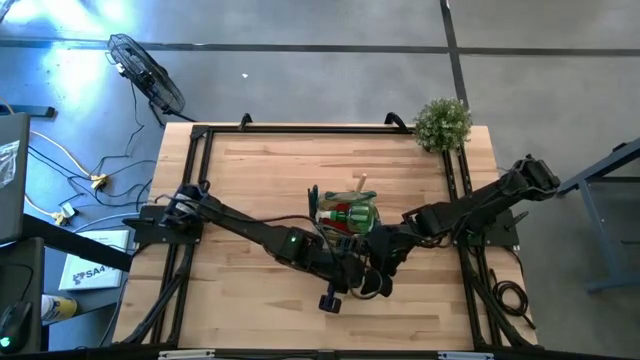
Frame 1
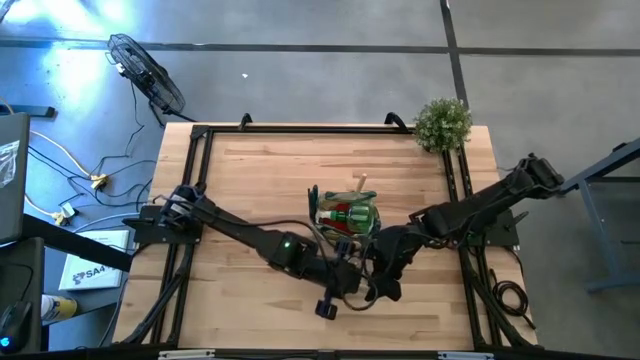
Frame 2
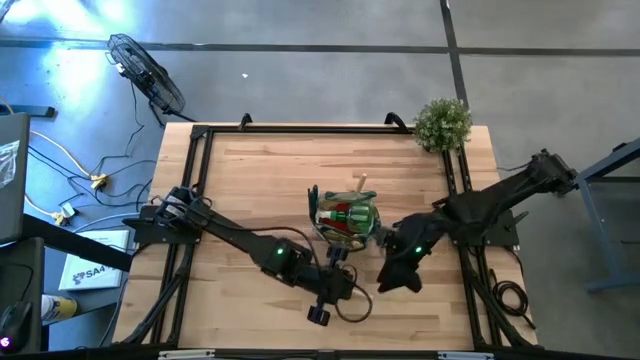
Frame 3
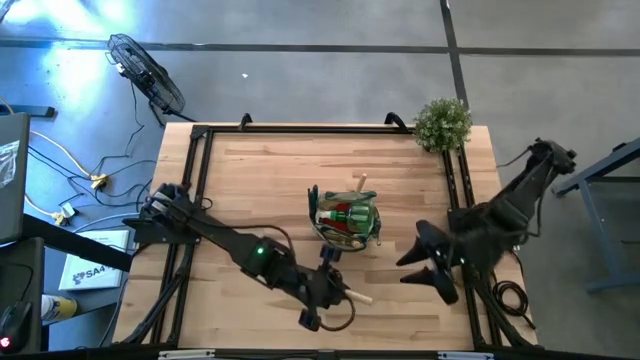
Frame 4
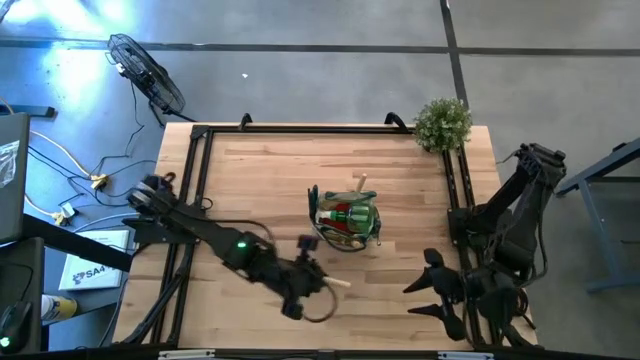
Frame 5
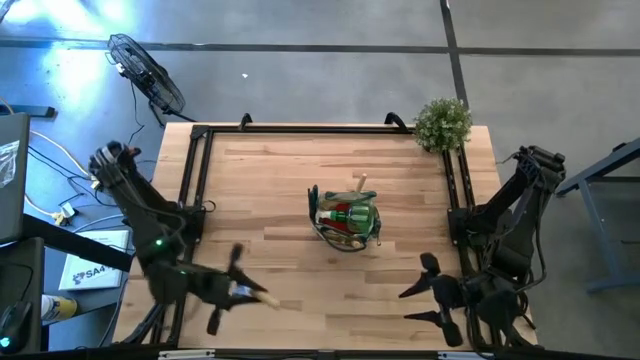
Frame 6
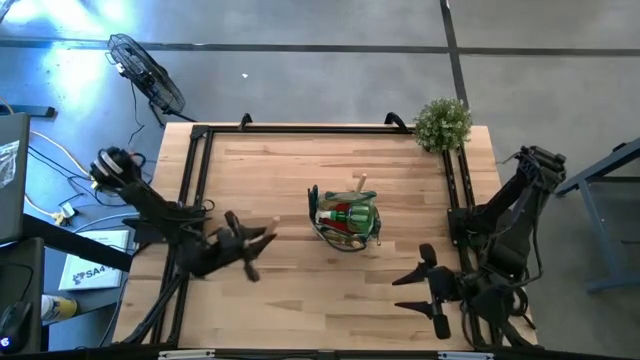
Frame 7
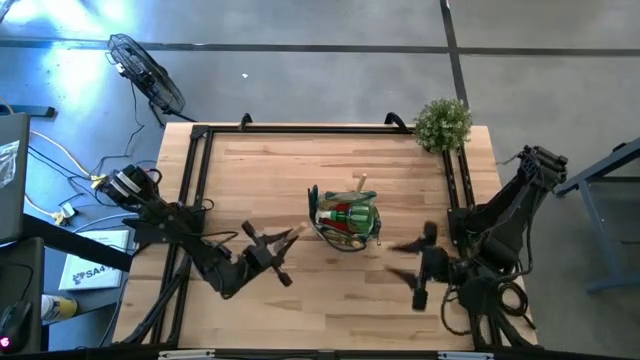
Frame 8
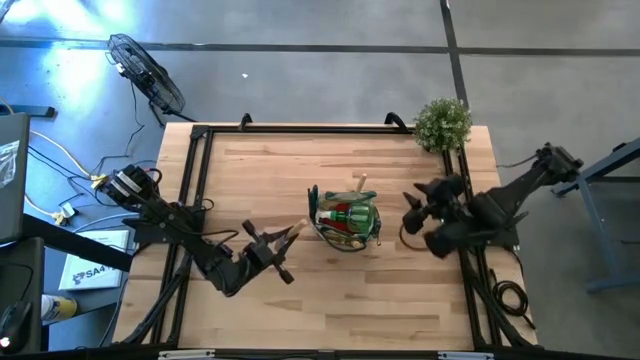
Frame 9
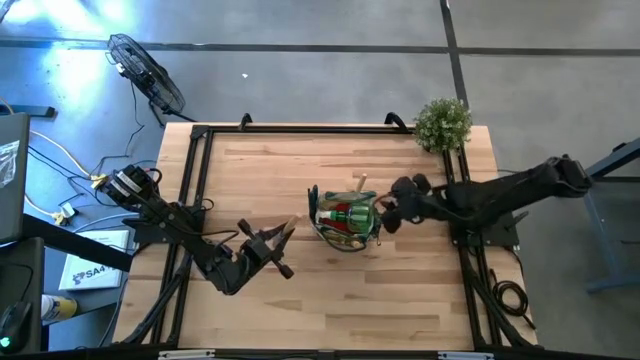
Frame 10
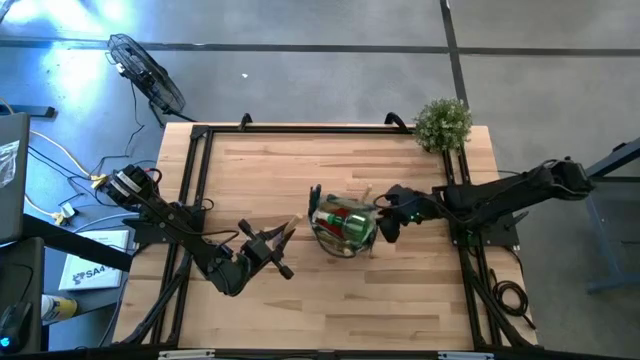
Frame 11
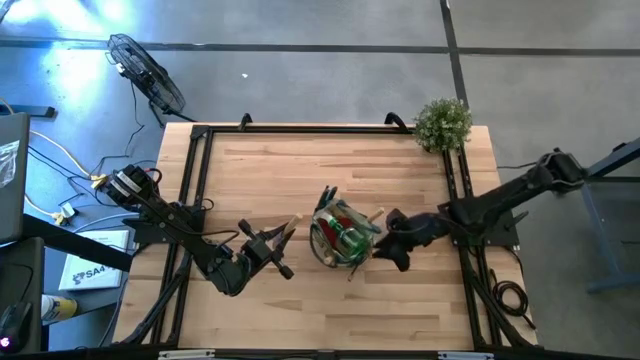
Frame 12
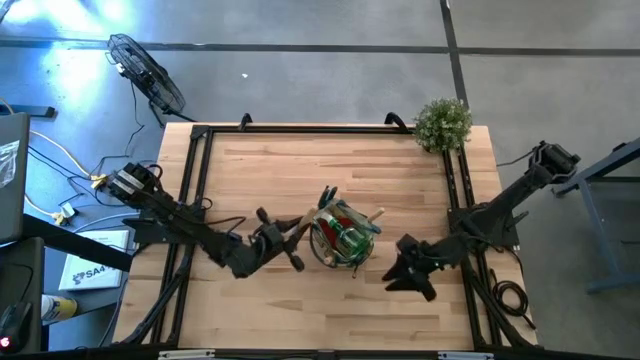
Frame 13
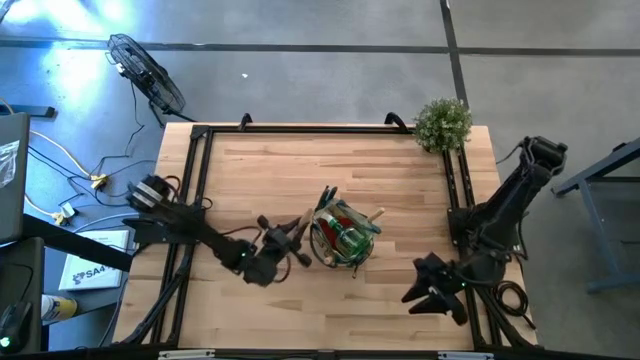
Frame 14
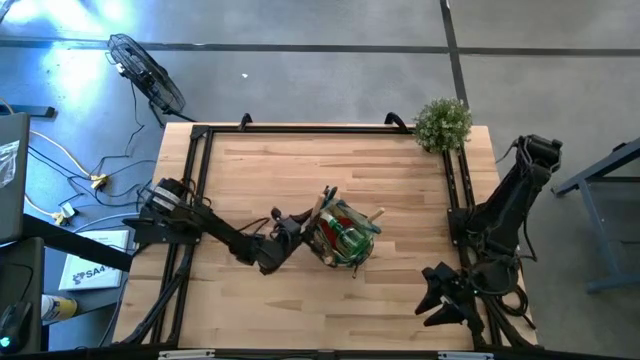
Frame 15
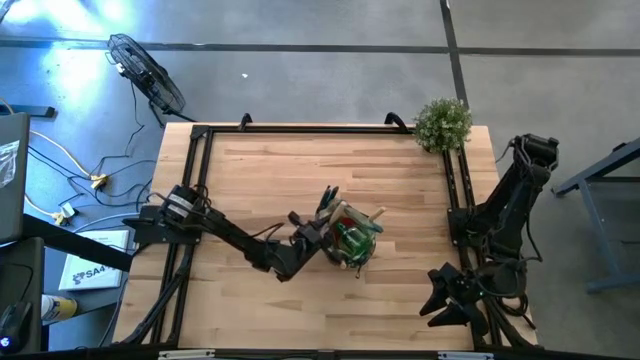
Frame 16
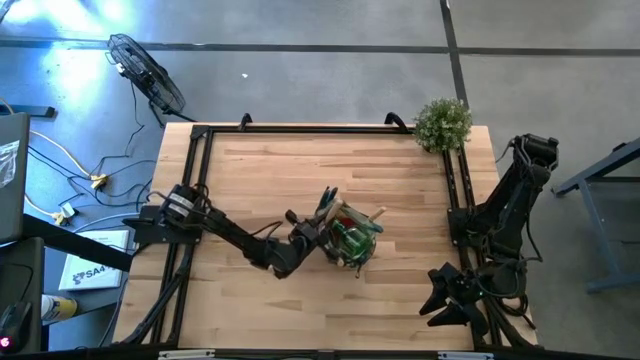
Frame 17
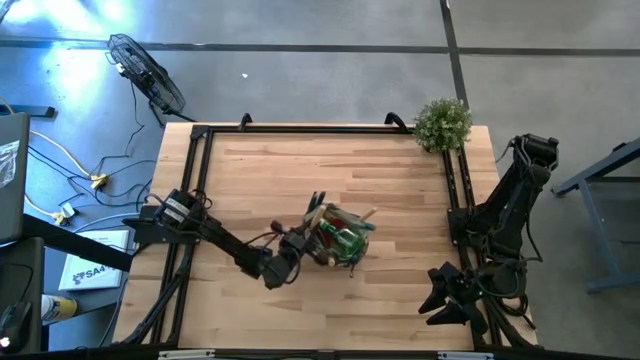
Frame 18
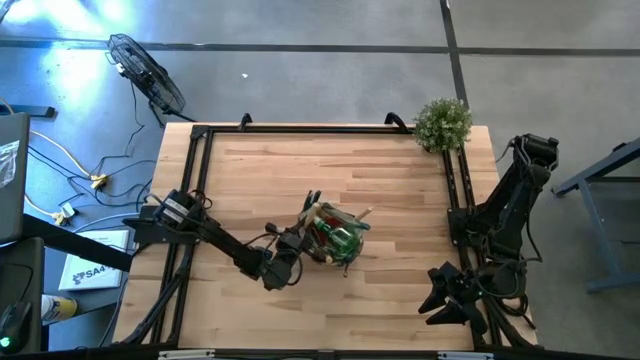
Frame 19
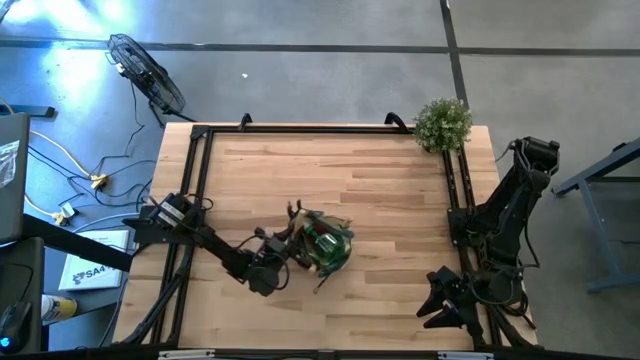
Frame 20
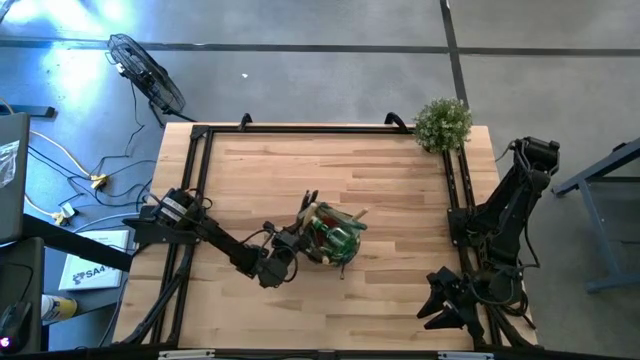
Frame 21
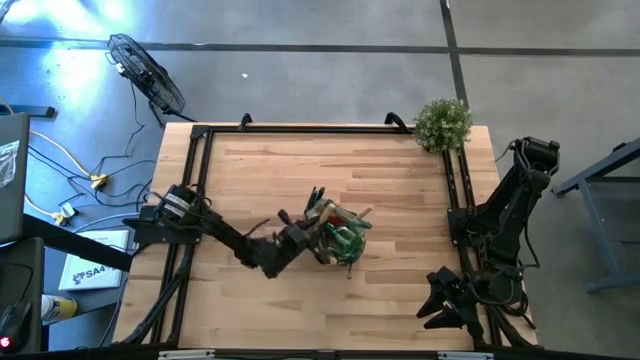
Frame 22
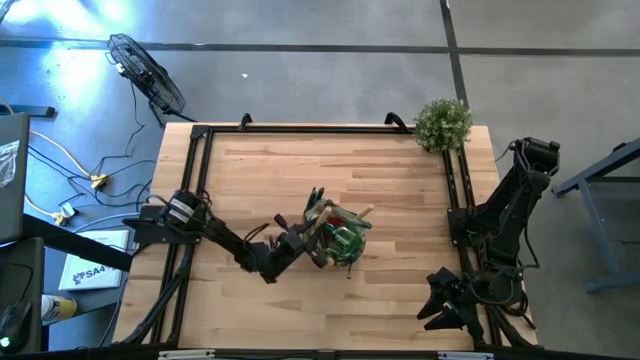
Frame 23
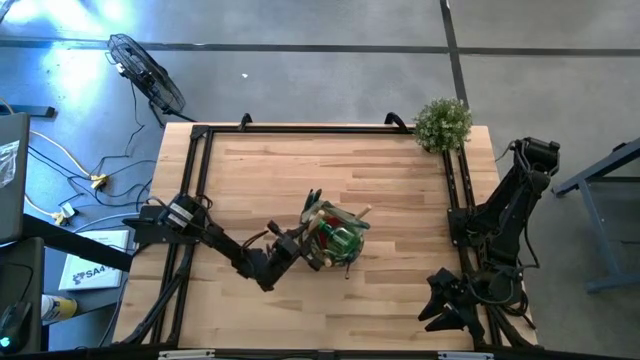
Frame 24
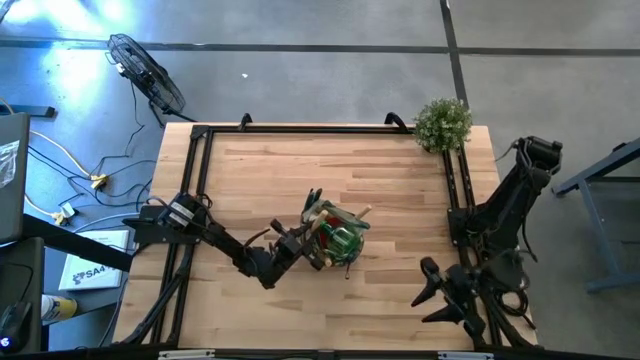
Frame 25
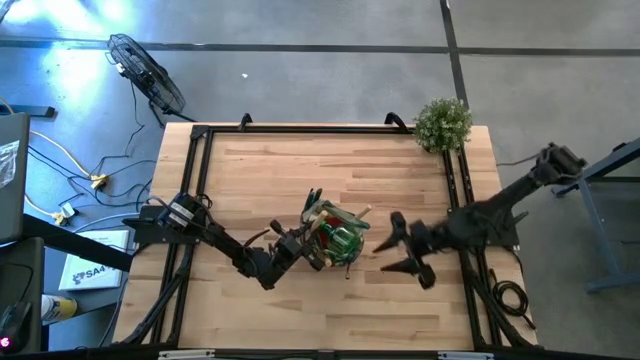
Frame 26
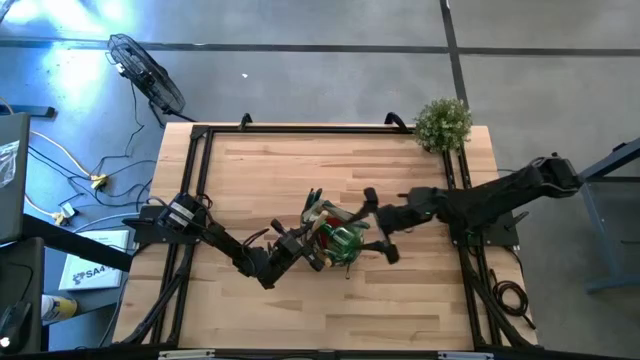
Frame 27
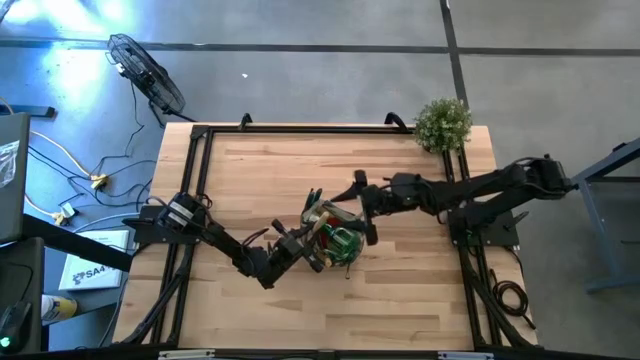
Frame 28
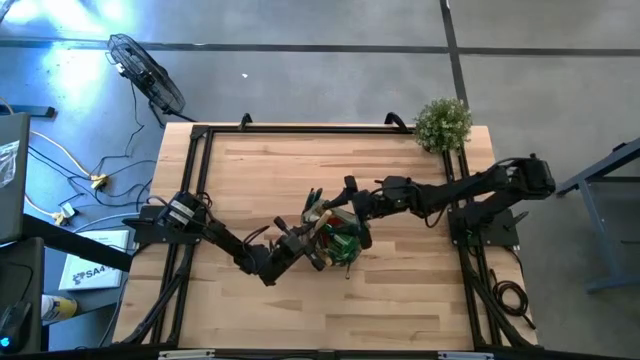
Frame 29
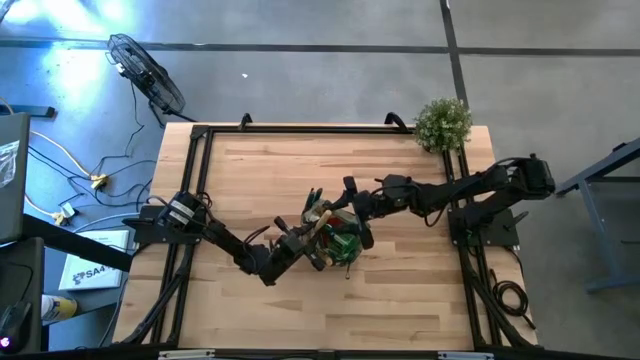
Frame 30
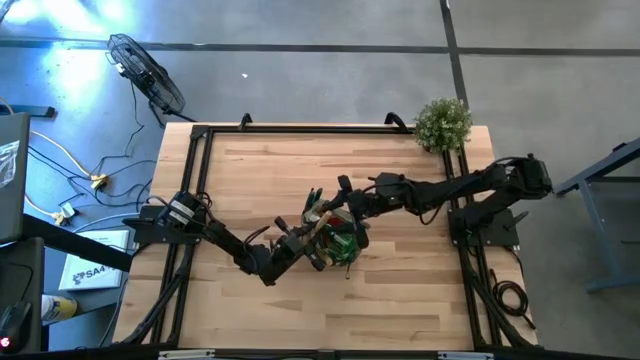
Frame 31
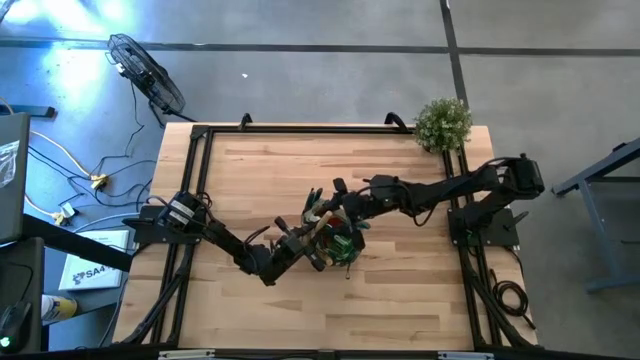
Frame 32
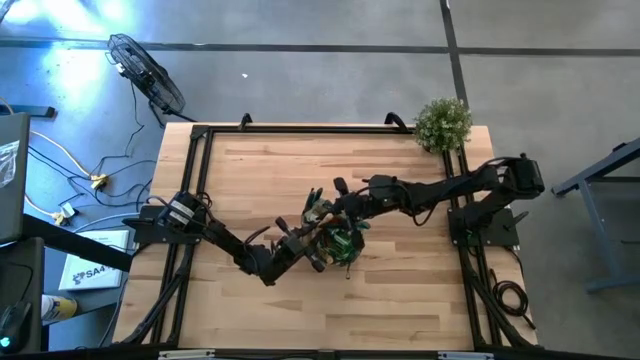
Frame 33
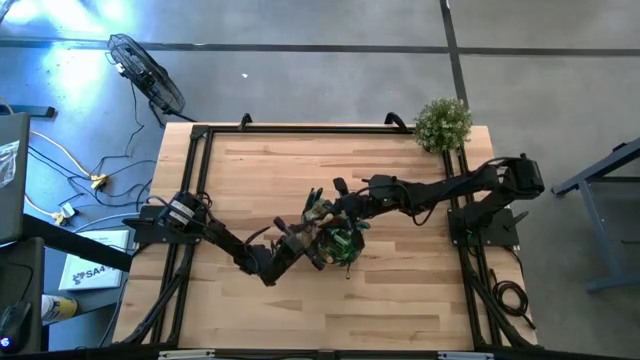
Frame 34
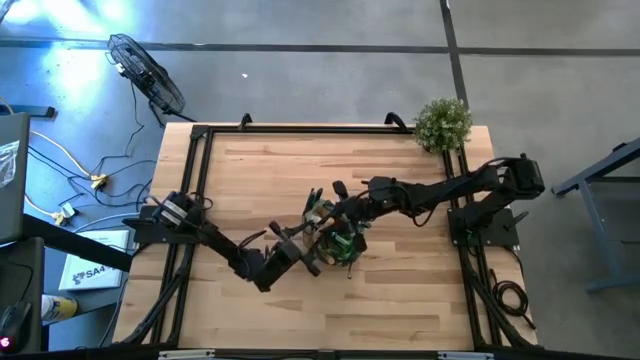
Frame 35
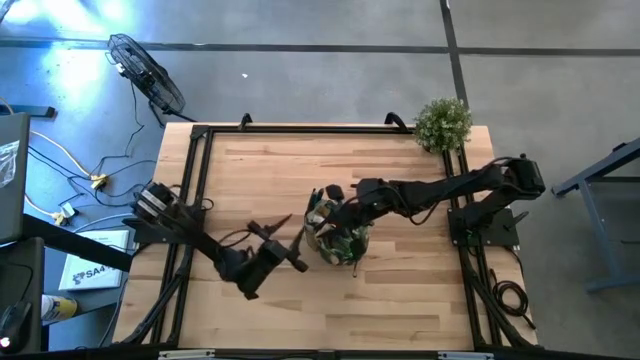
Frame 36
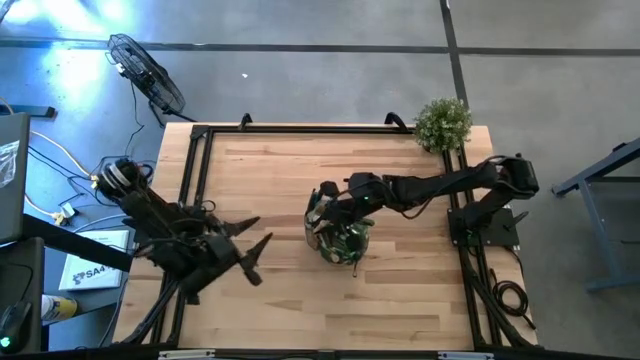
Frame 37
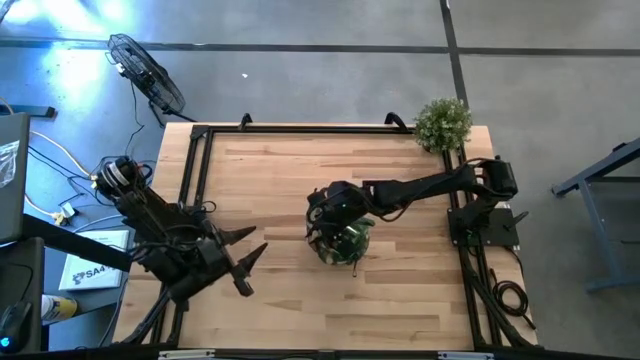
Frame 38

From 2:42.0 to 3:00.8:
Task: Pick & Place Garden tools in Gardening bag
Put the brown trowel into the gardening bag

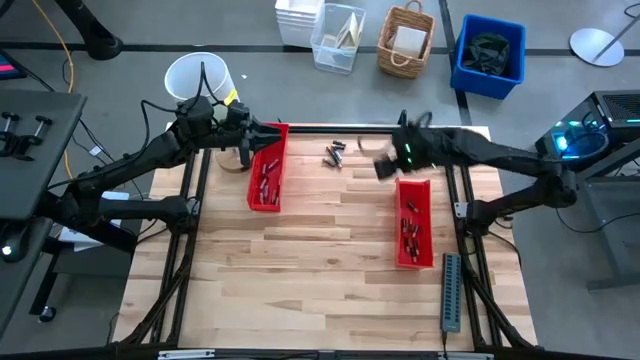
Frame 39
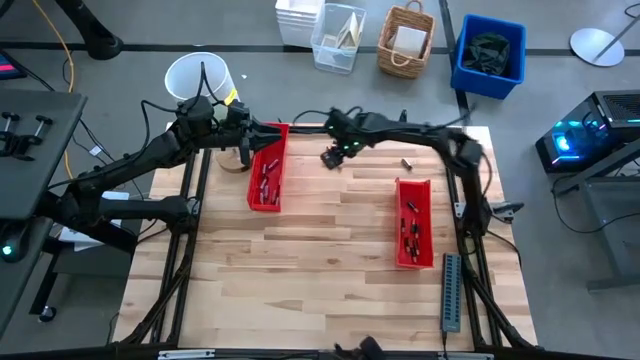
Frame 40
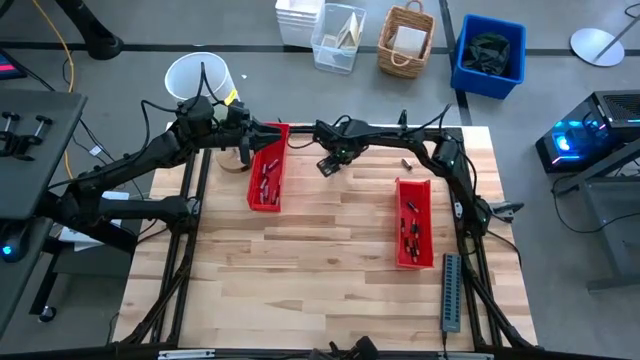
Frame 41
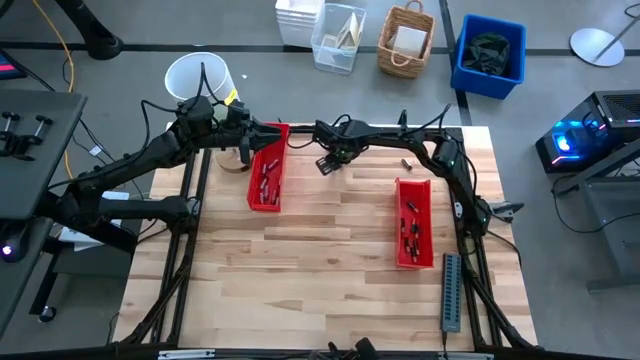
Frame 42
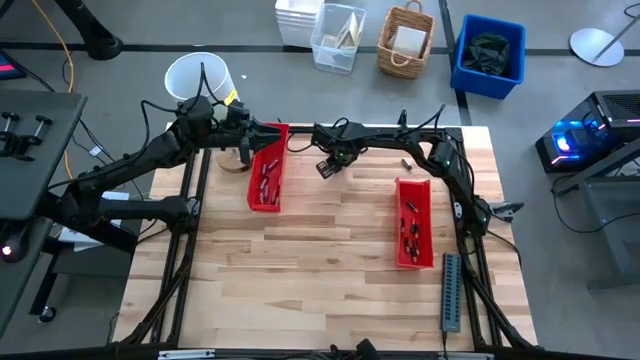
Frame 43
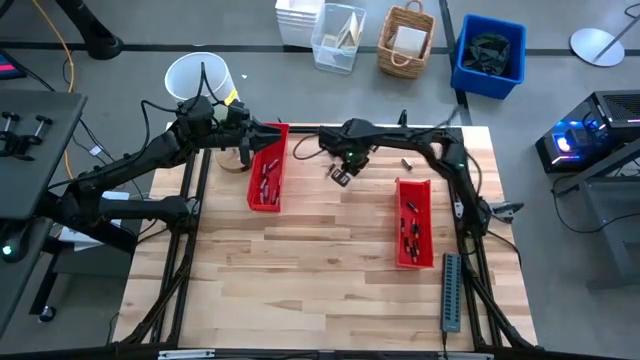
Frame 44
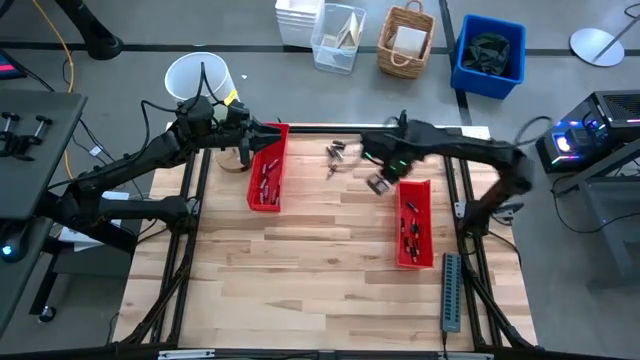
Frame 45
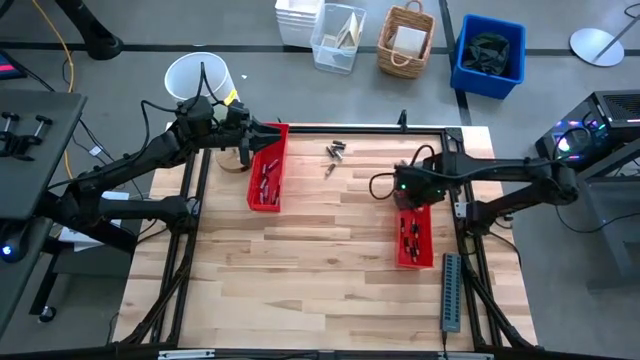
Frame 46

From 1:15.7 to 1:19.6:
Task: Sort batteries
Put the black battery into the bottom red bin
